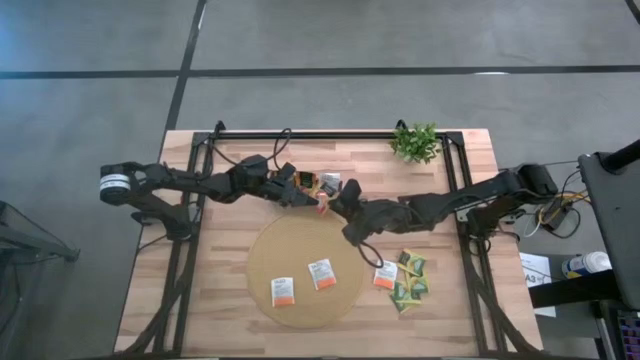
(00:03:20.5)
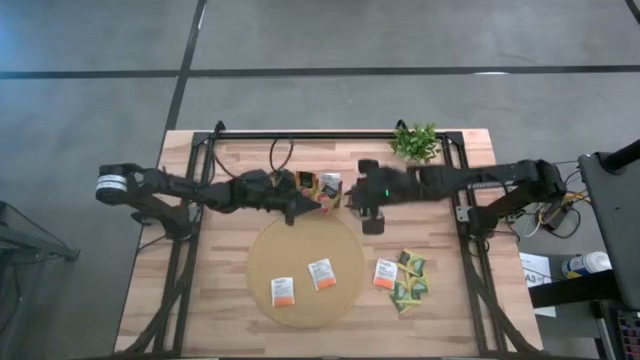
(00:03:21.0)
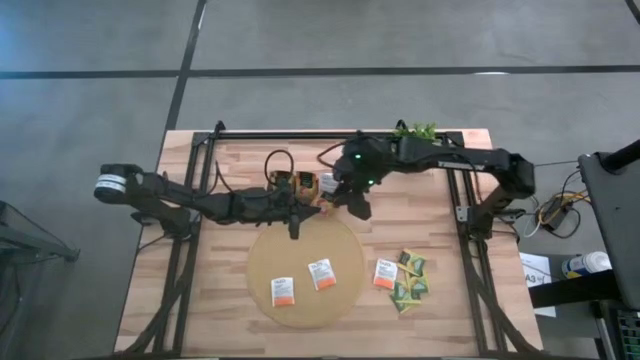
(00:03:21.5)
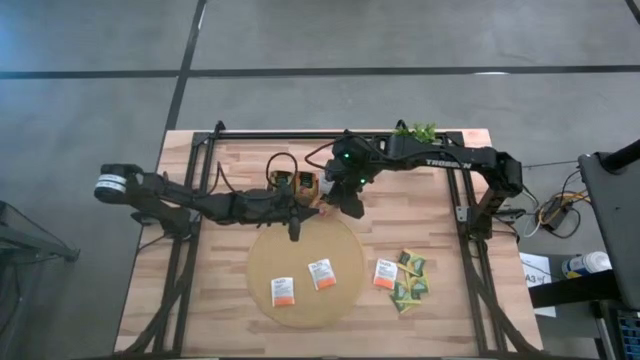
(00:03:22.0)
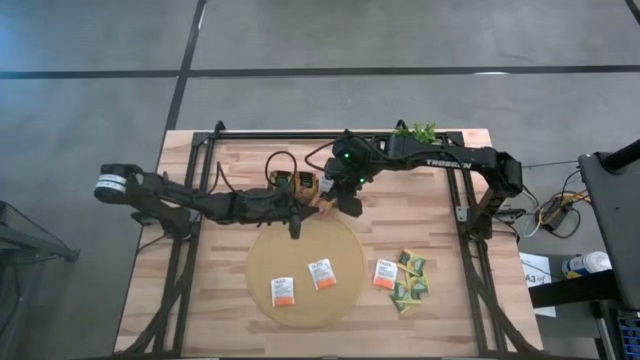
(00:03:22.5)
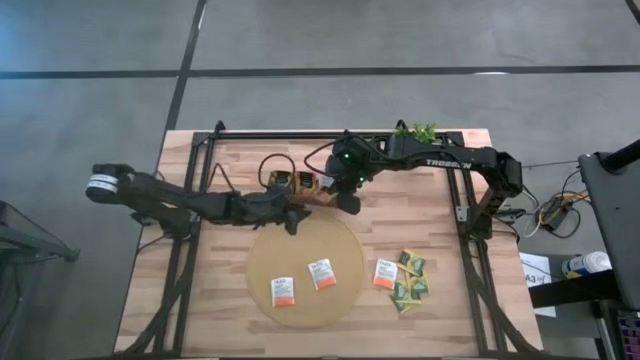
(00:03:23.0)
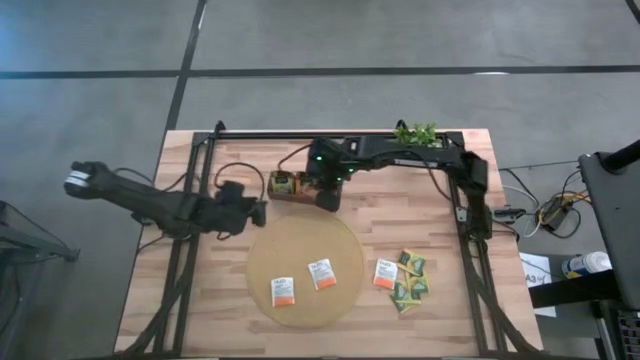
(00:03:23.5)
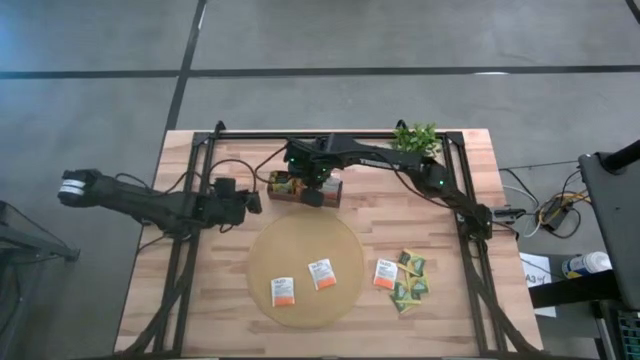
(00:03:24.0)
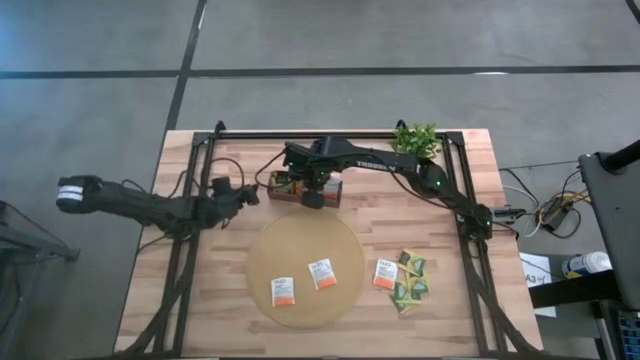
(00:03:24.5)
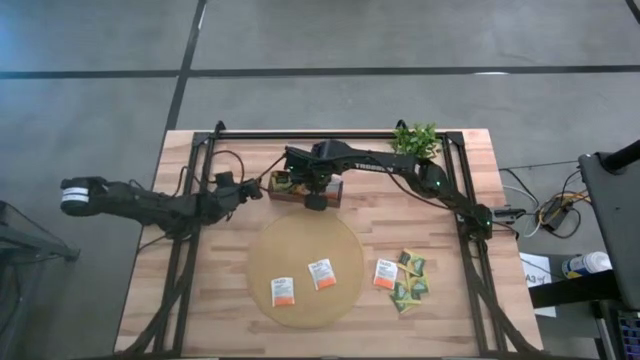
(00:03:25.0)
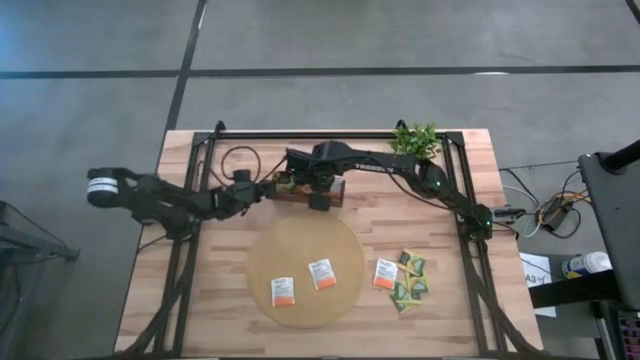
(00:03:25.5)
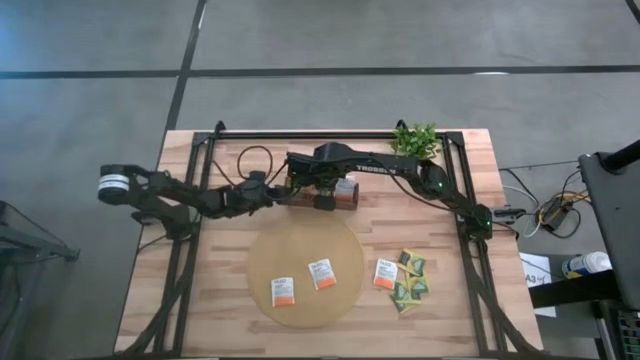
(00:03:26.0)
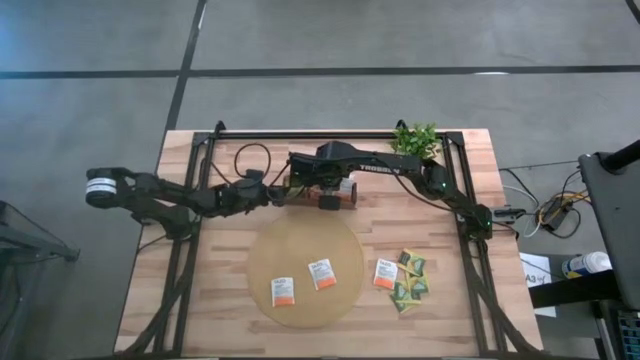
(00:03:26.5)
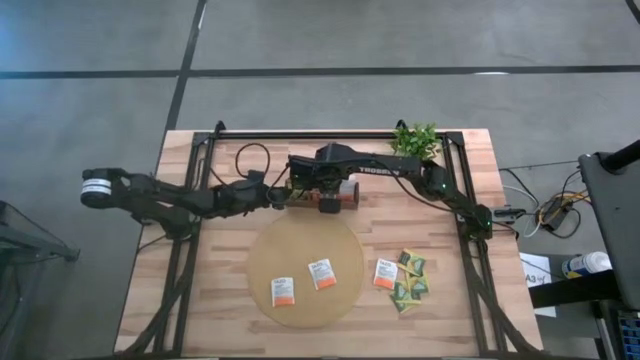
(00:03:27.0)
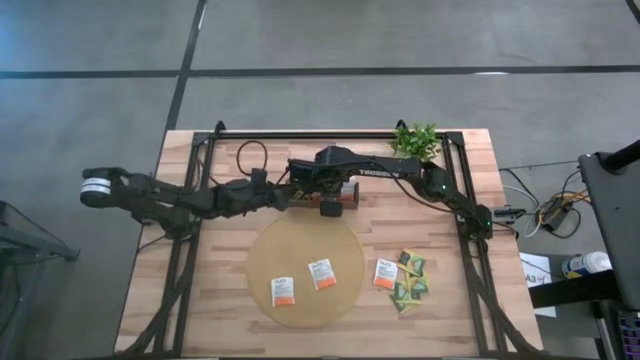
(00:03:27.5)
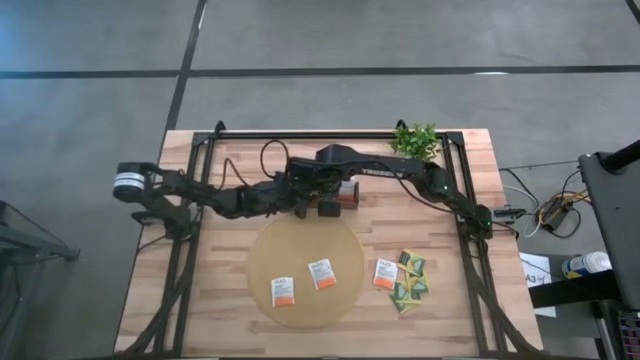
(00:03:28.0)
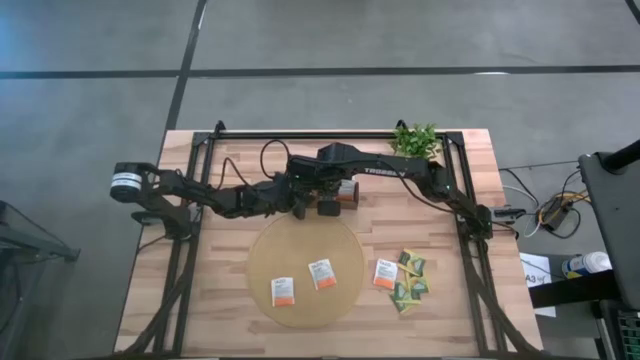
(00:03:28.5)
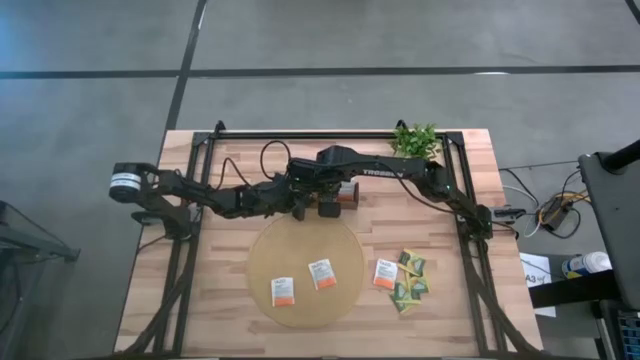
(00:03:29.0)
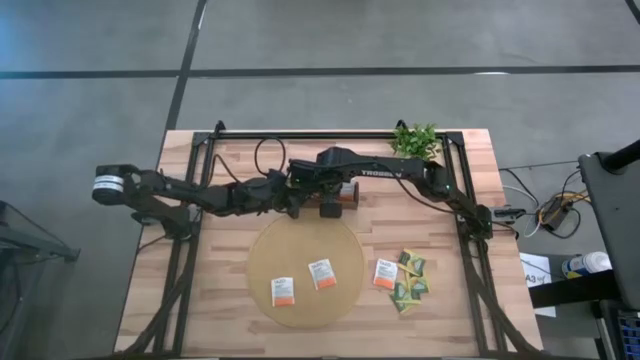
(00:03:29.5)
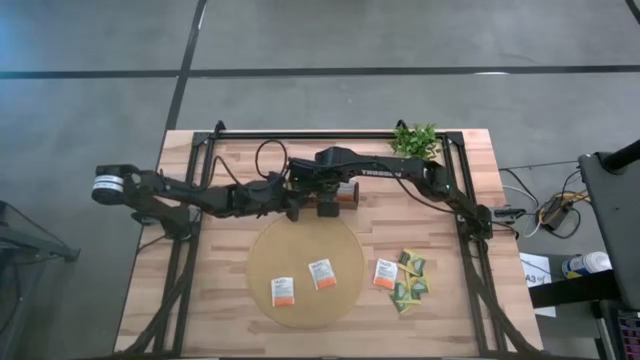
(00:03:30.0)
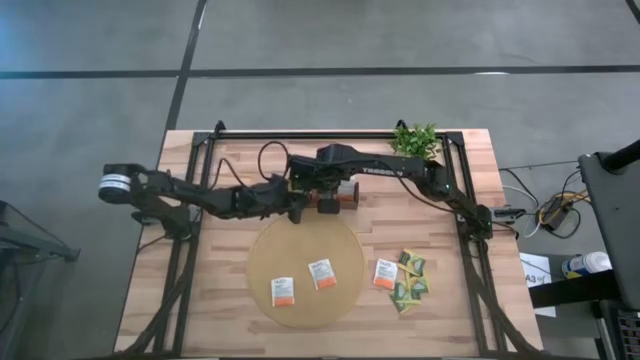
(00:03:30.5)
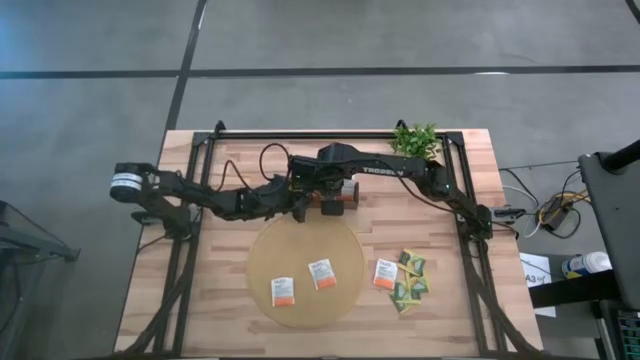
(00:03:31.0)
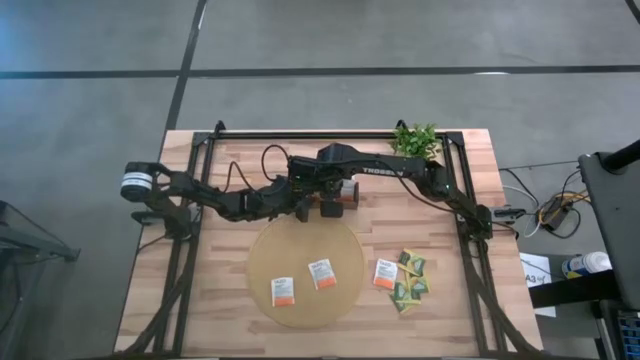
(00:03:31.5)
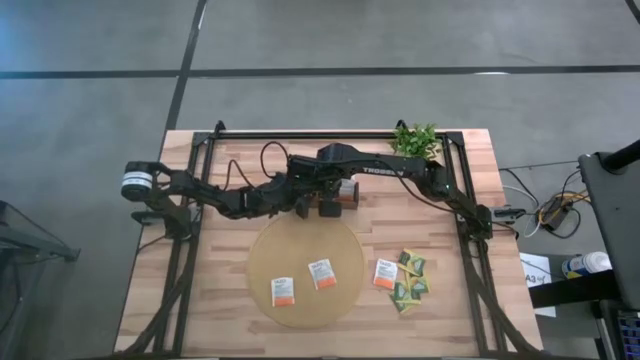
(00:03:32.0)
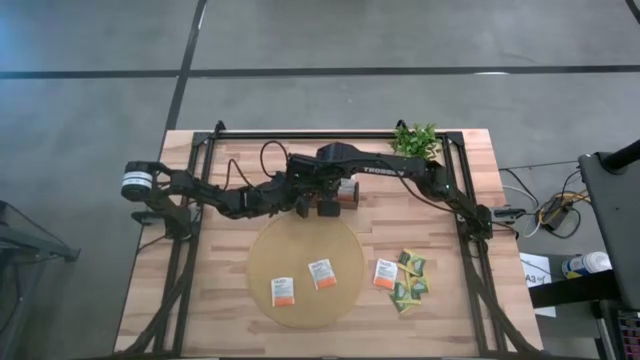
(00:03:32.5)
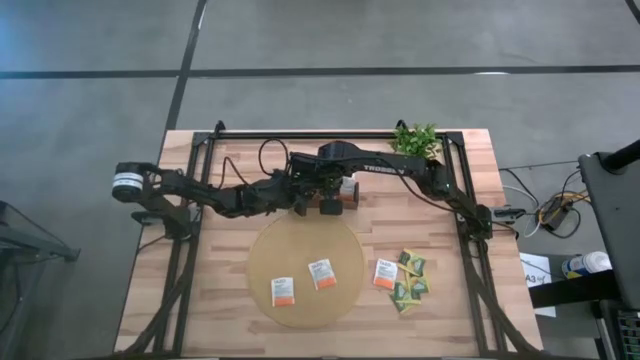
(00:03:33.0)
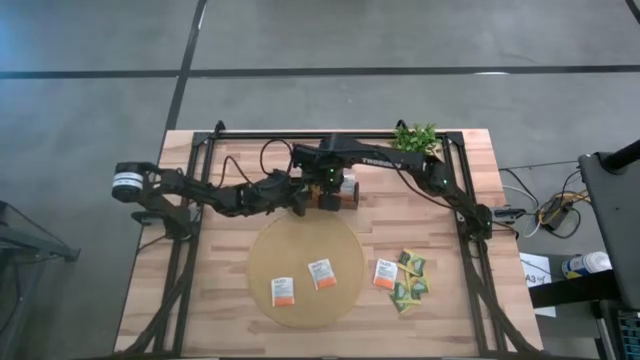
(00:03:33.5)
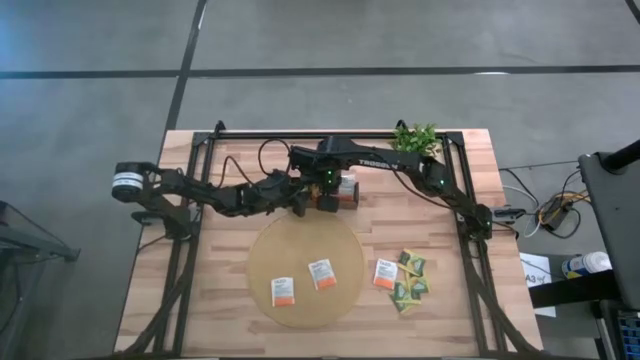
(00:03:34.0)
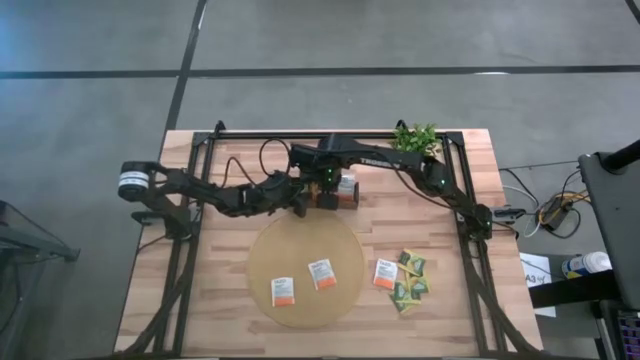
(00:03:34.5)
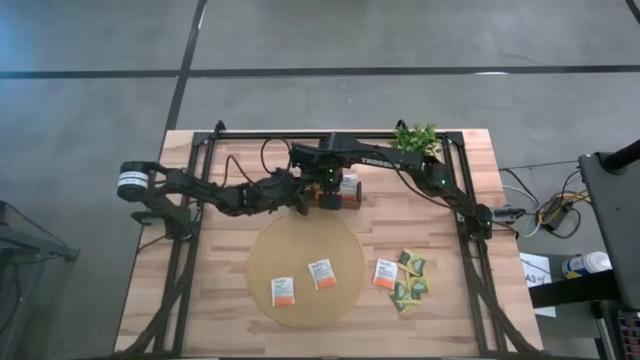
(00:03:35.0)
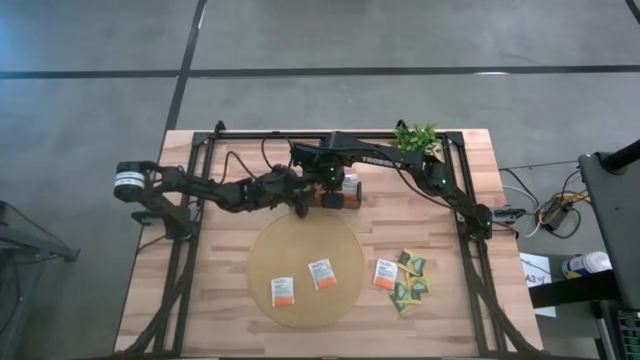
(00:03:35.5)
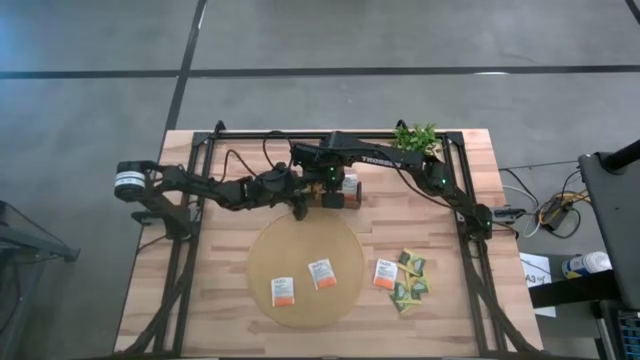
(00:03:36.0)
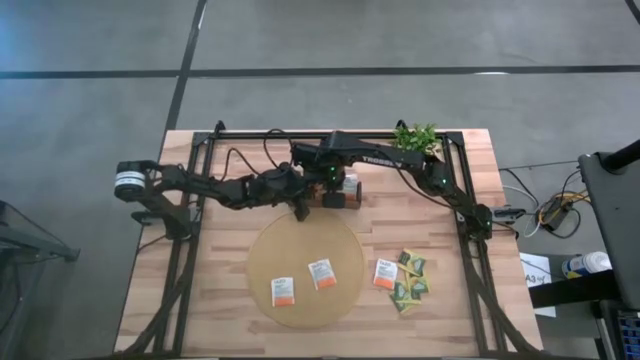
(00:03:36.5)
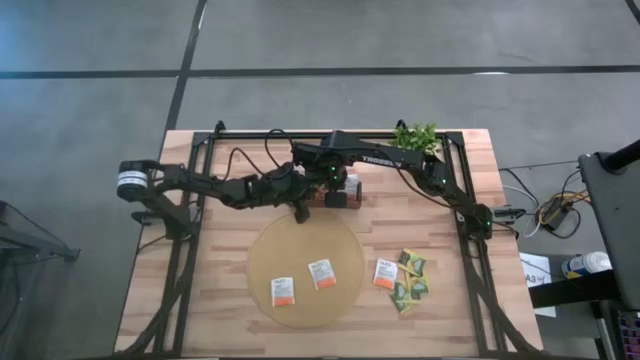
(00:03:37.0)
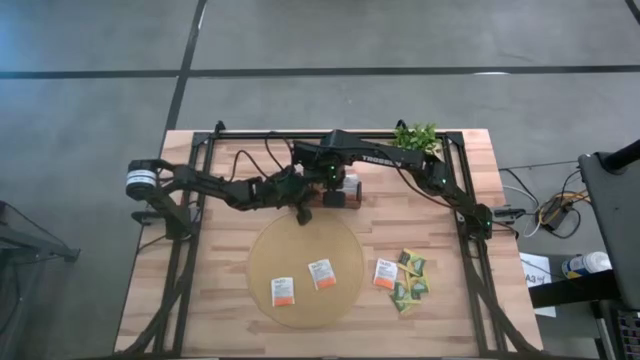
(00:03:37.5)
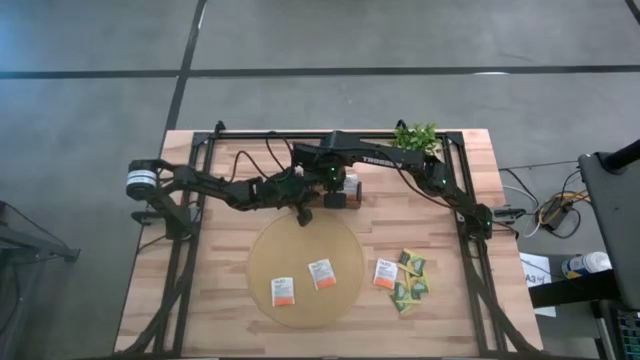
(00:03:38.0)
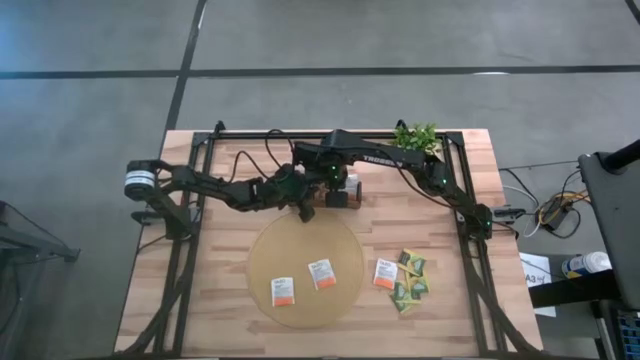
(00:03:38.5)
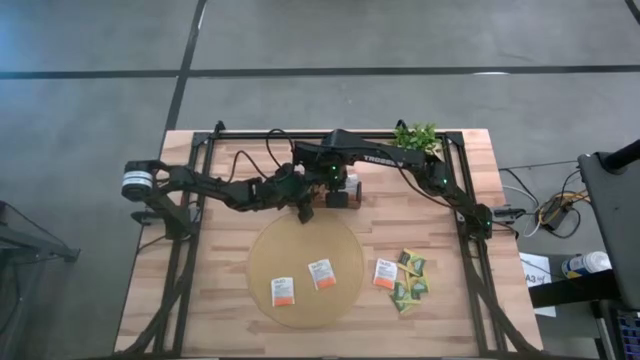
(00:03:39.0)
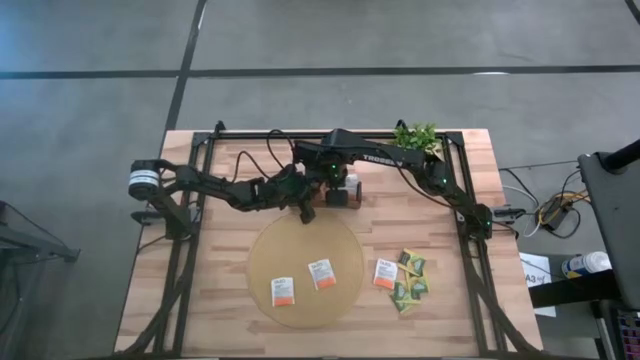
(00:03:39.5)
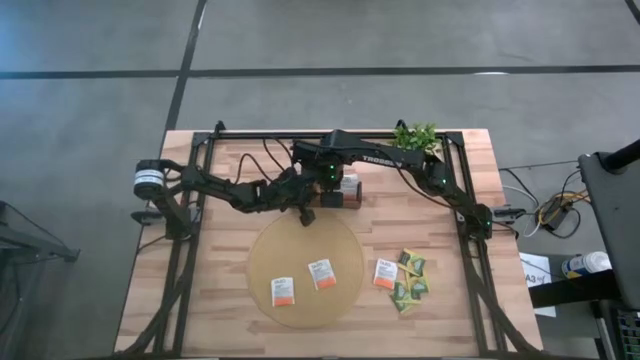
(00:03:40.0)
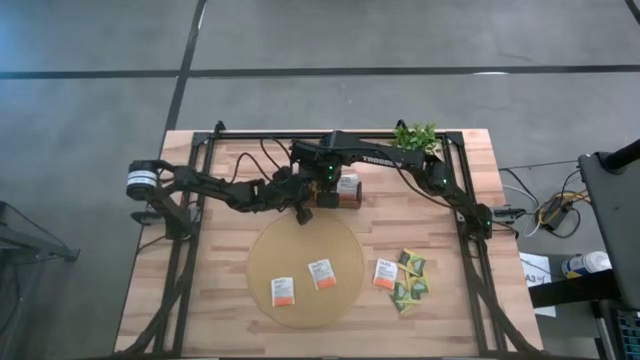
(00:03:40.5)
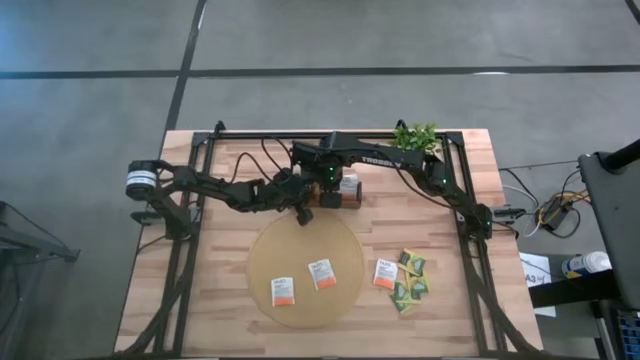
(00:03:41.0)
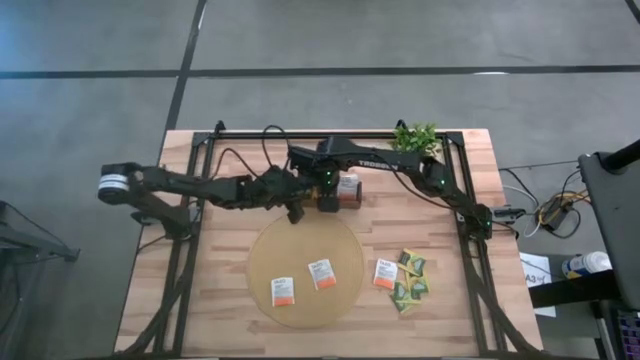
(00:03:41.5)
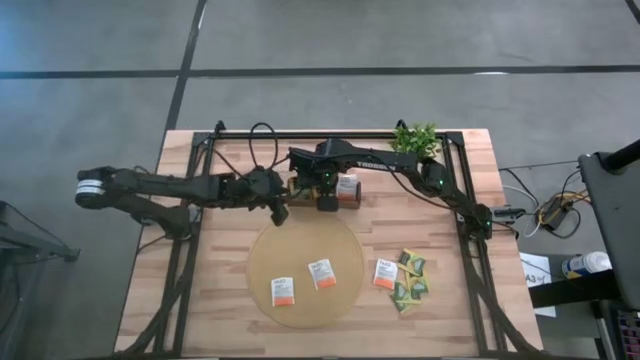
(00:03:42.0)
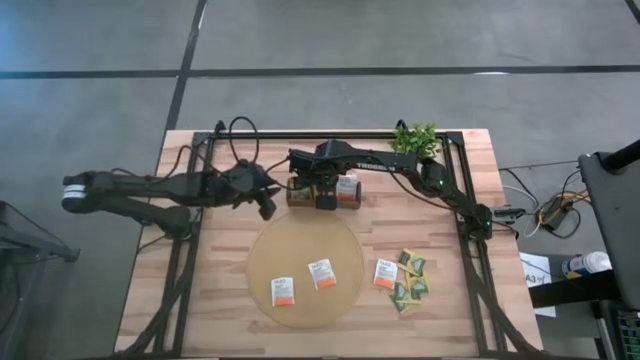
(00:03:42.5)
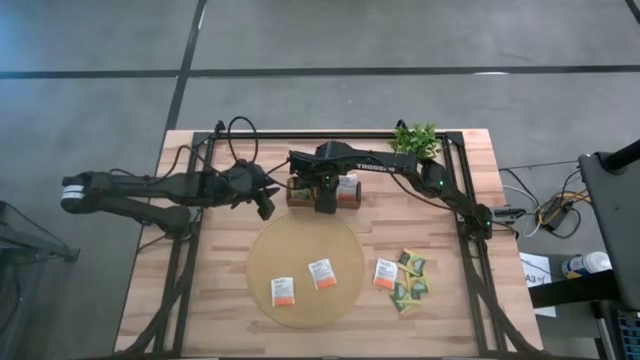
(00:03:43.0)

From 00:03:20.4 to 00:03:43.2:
Task: Pick & Place Tea
Put the yellow tea bag into the middle section of the wooden organizer
